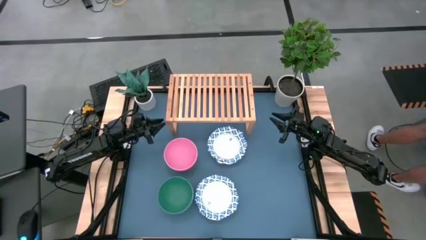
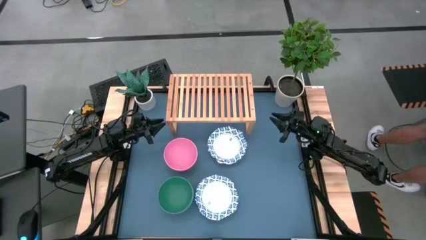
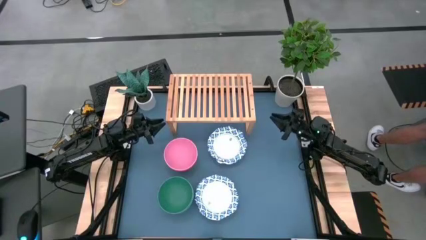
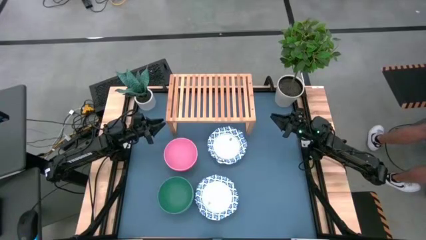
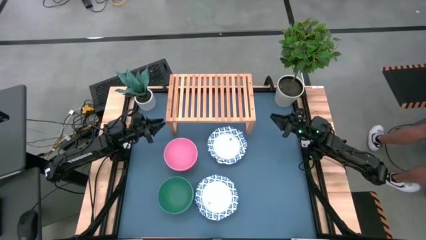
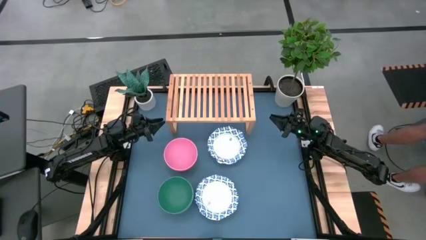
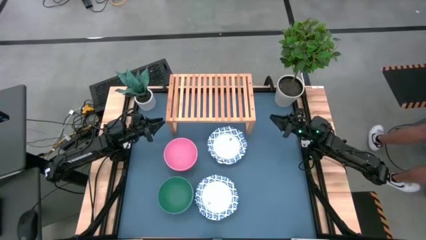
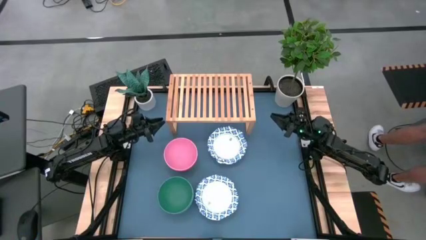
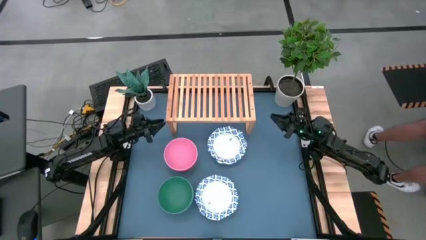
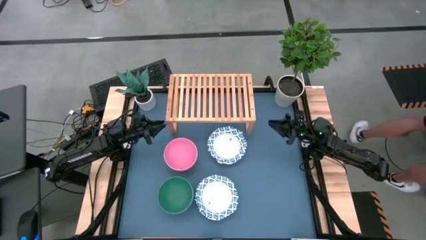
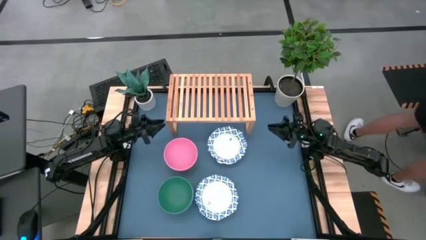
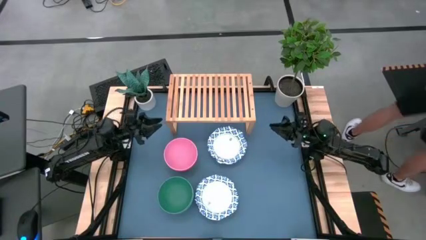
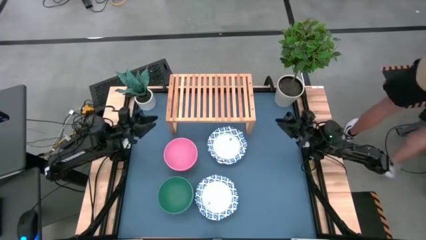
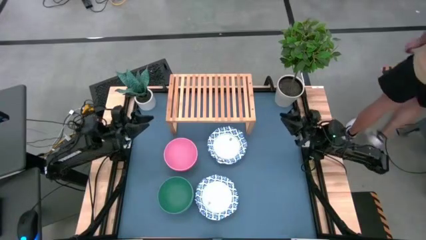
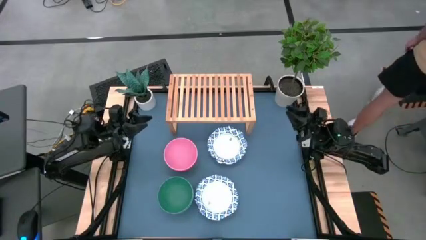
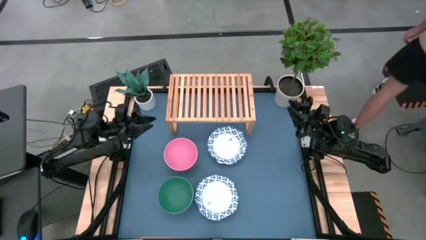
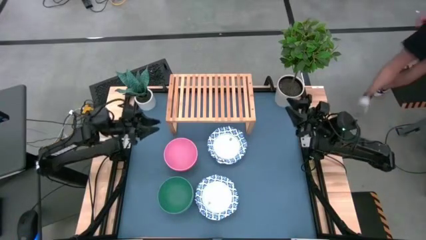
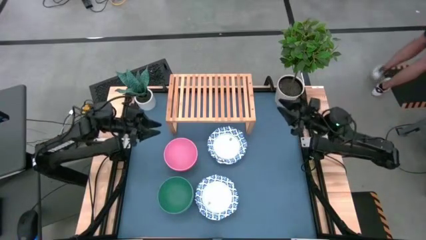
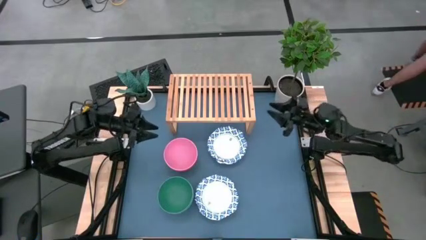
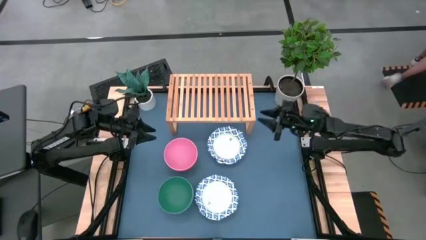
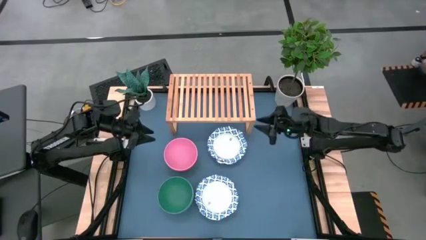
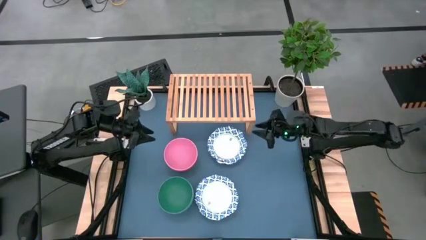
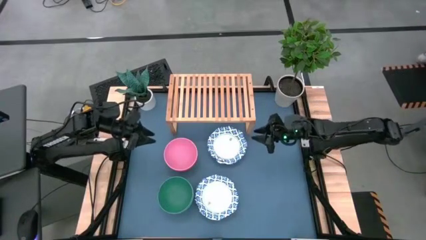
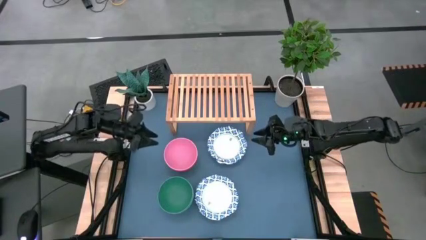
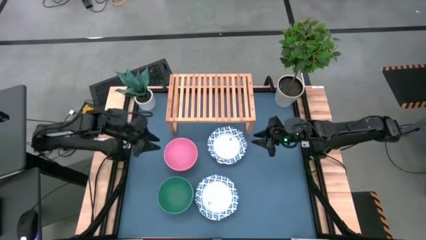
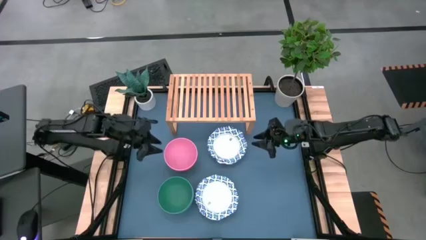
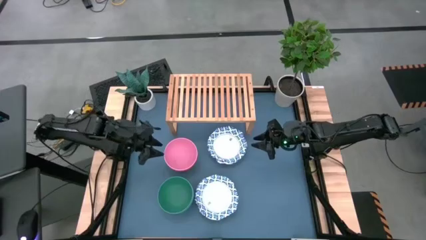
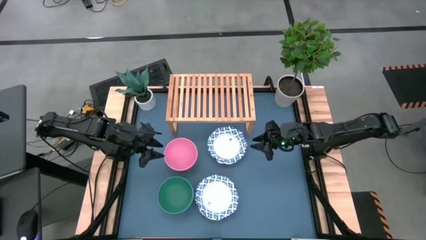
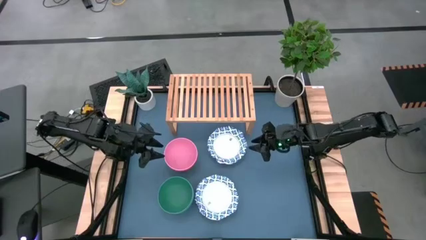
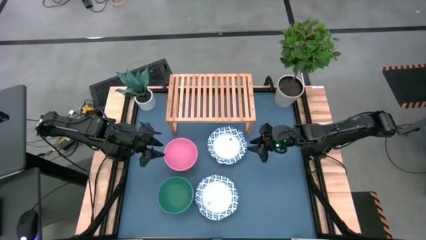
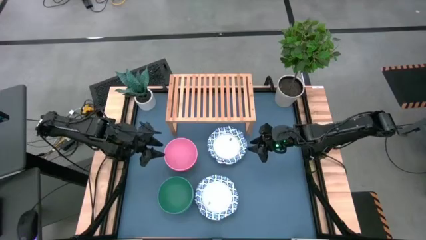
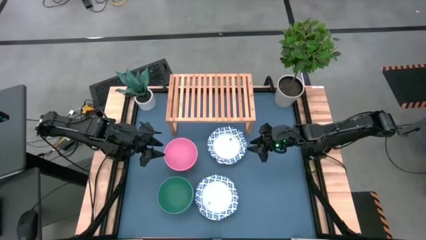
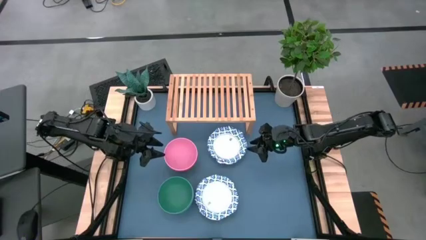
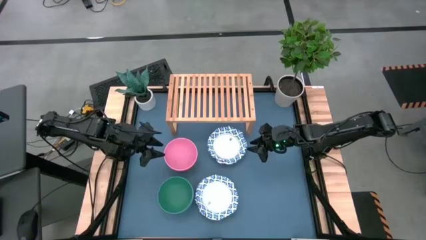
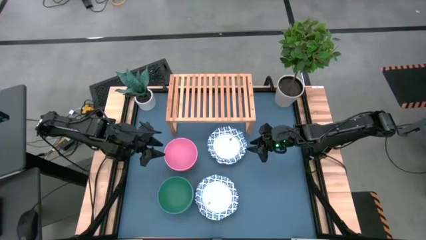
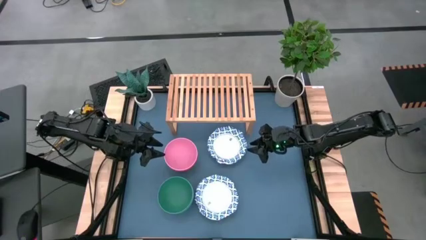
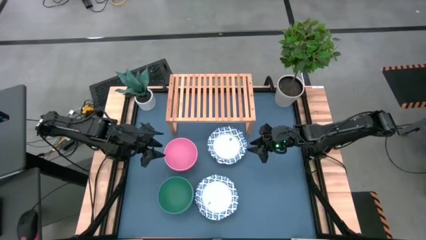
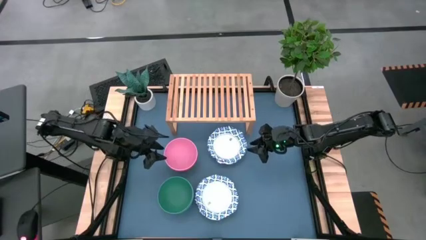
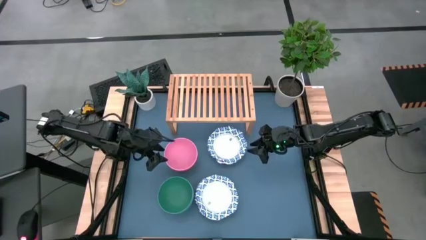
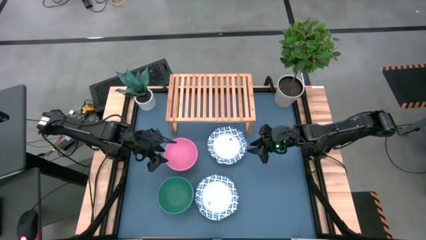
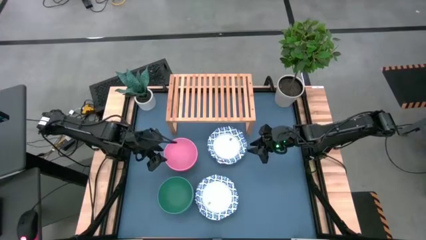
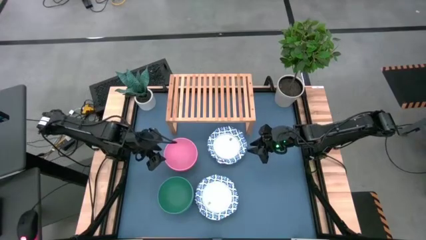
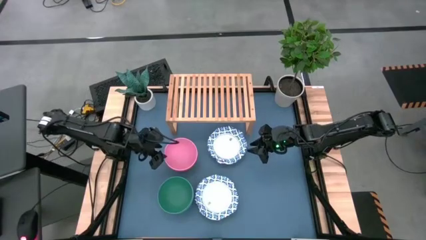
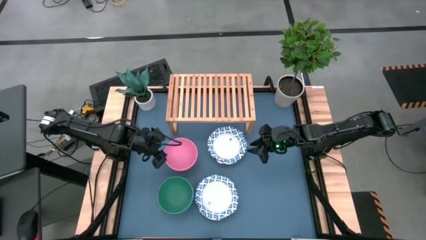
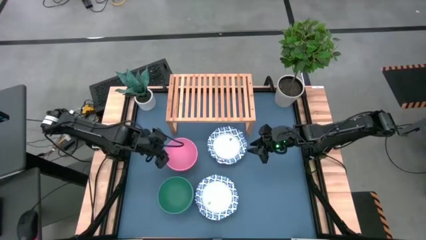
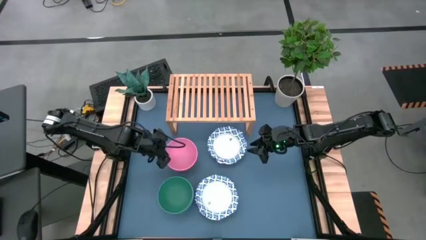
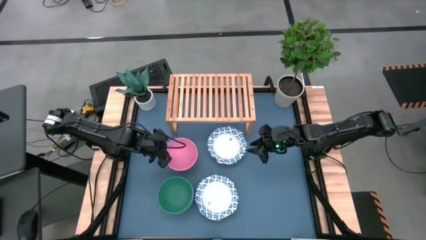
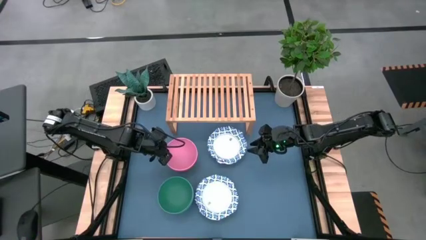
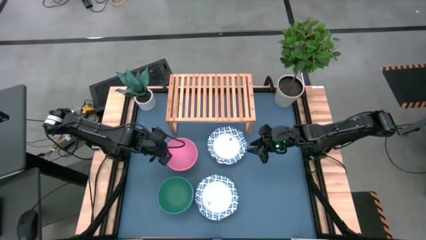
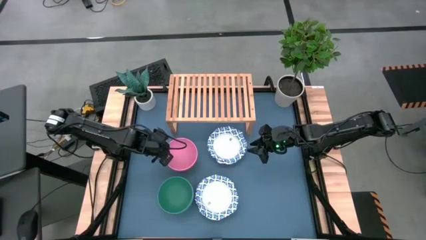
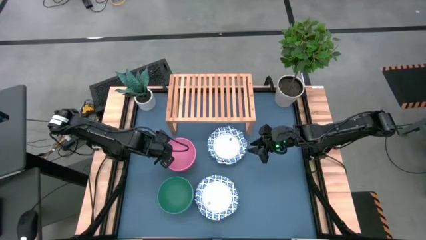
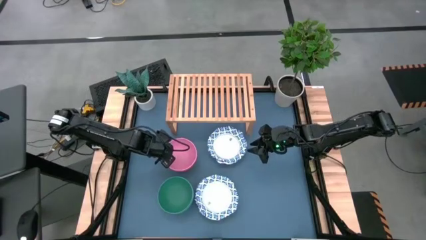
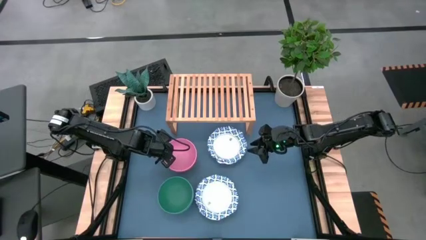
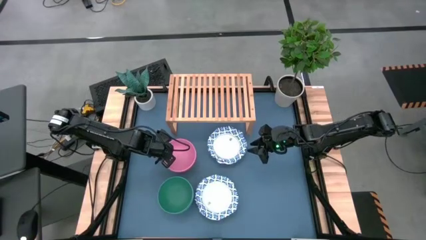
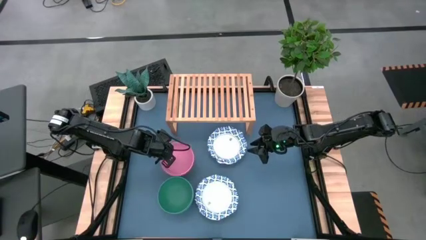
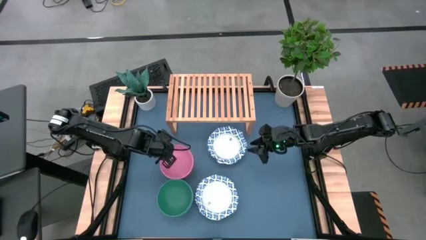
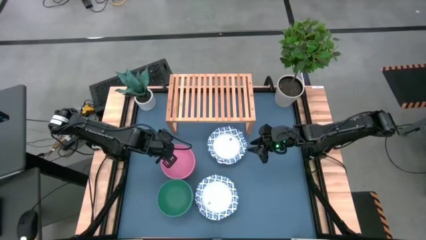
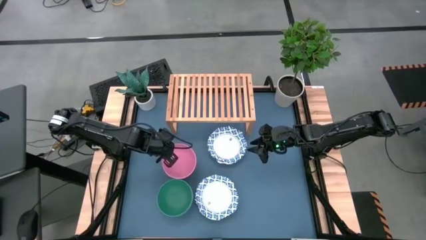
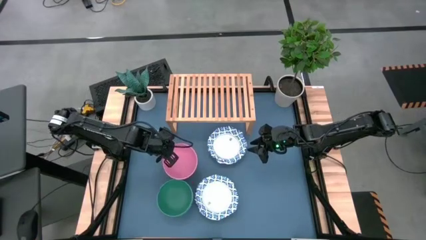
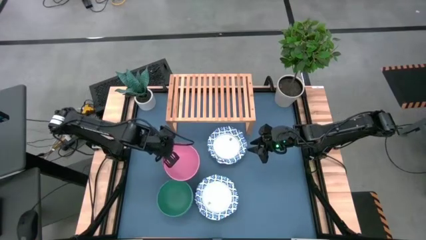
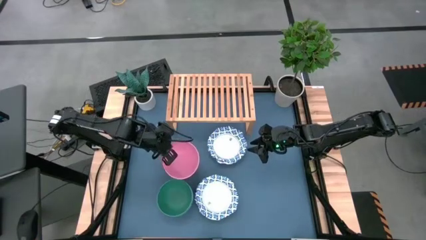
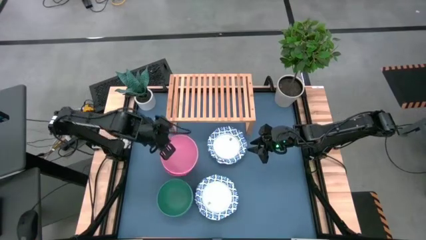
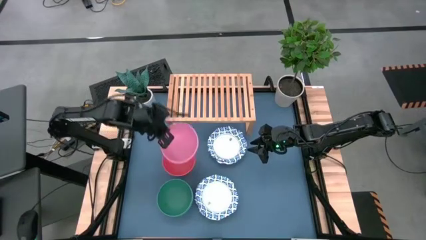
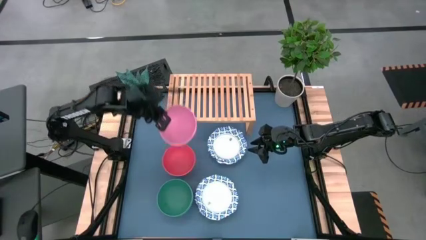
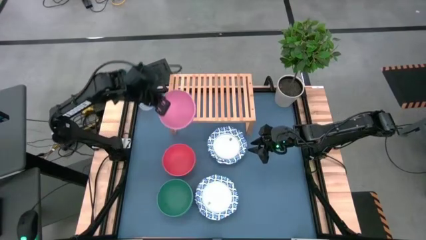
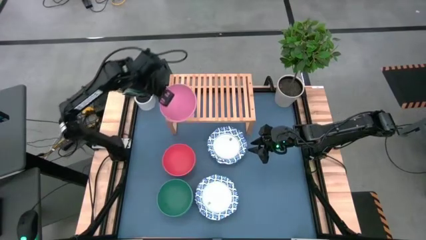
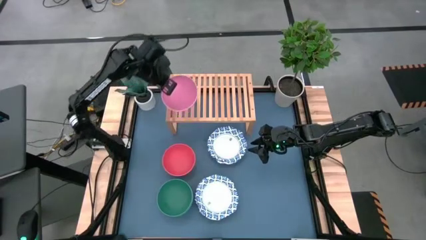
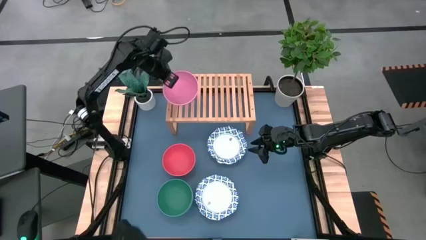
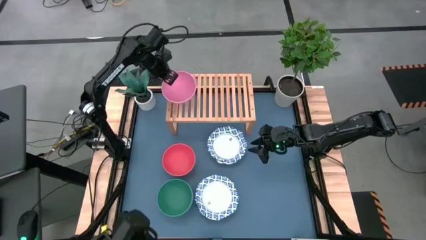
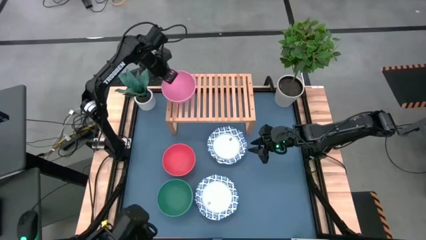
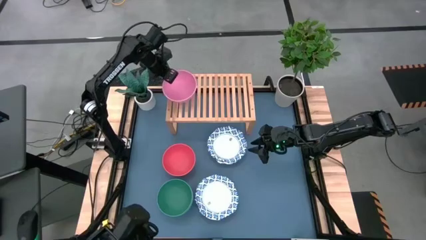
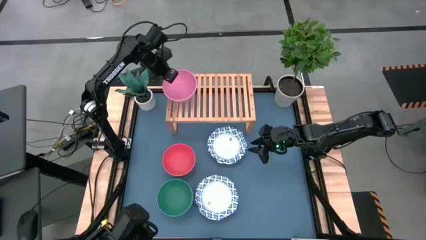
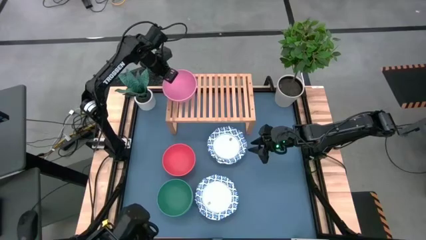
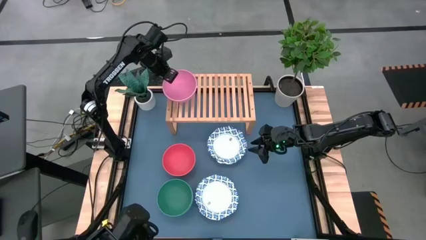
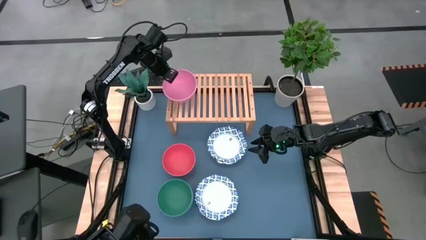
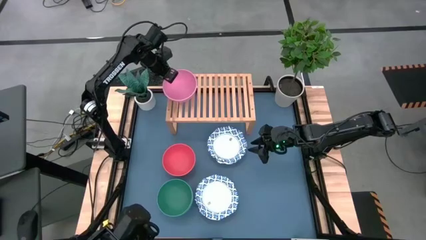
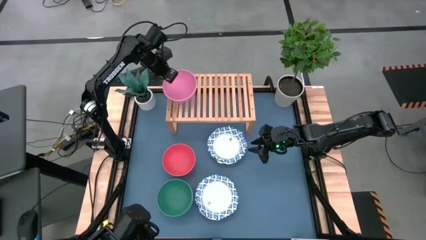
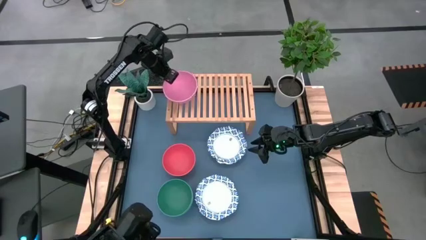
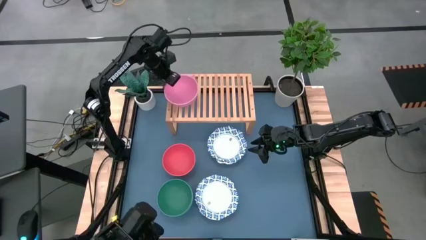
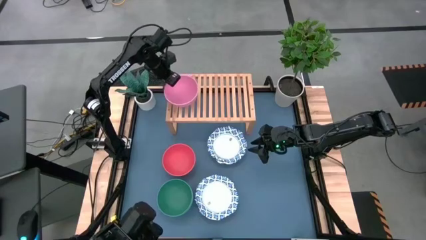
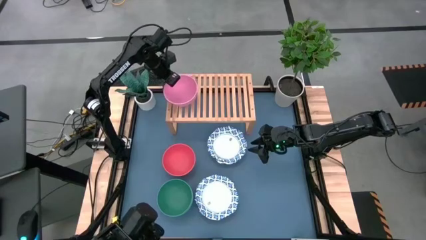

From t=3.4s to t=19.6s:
Task: Place and stack bowls onto a shelf
Put the pink bowl on the shelf
